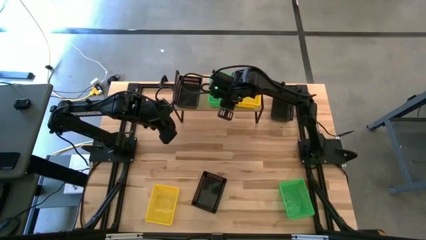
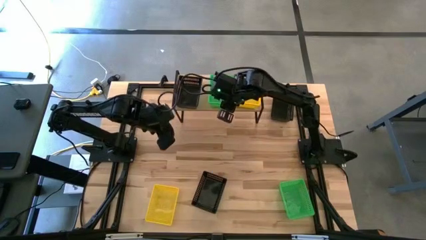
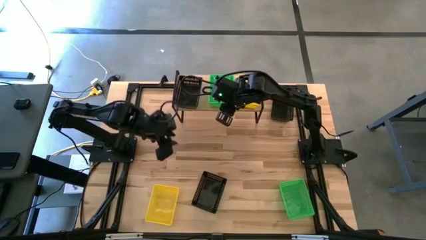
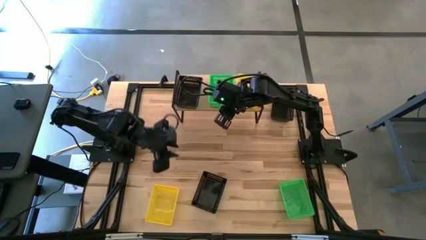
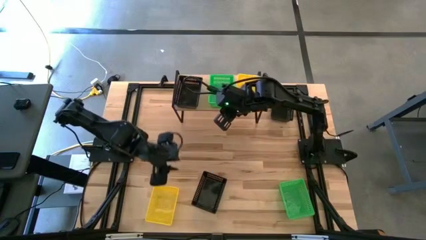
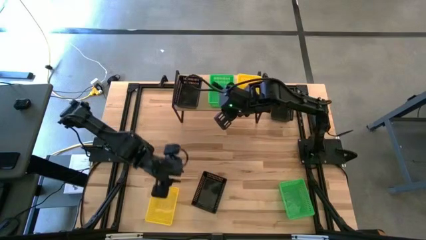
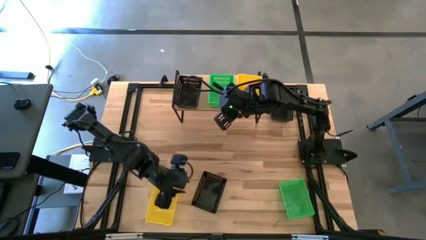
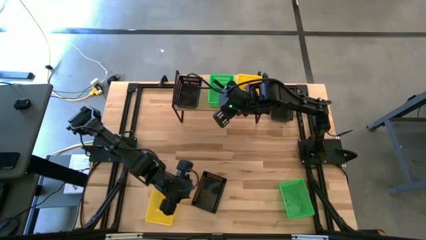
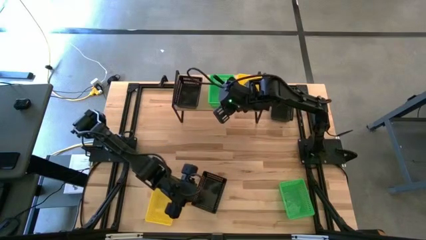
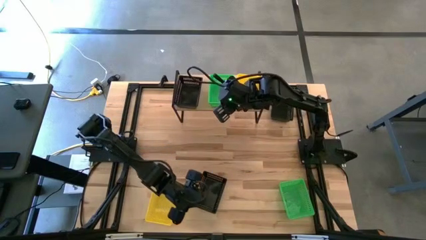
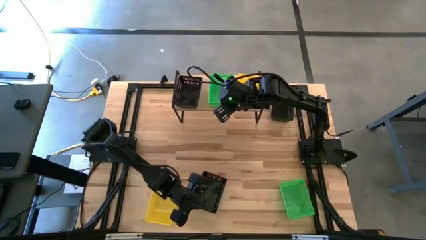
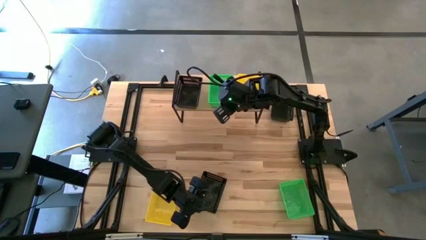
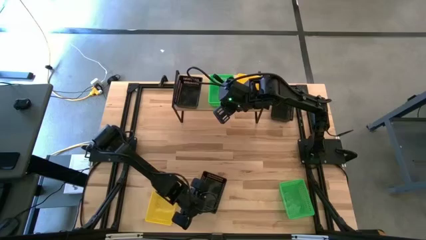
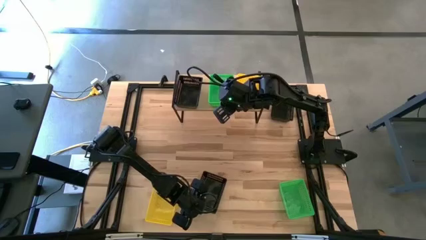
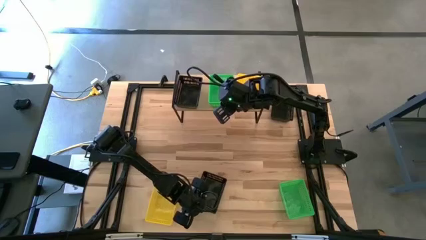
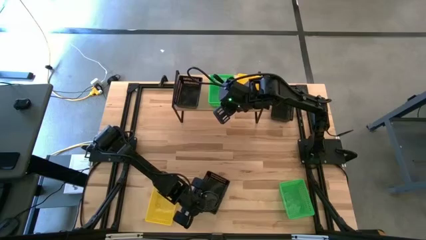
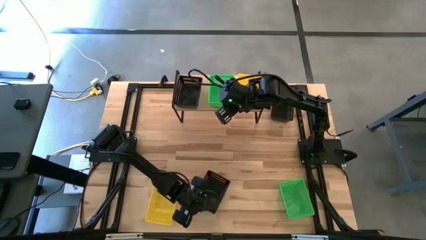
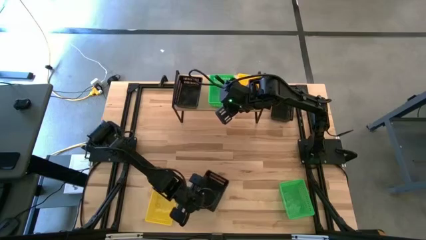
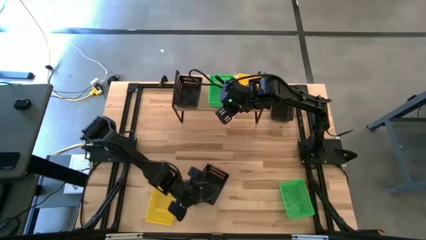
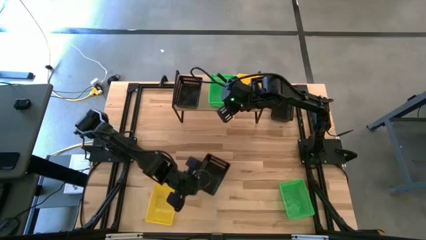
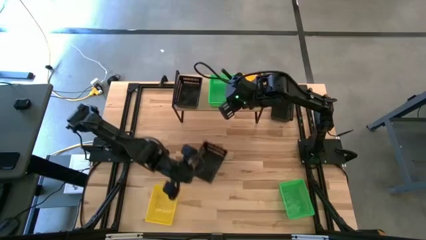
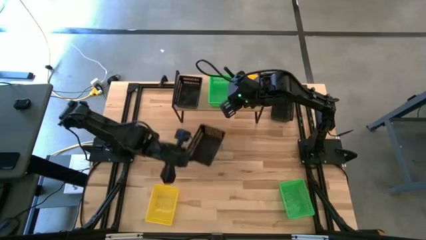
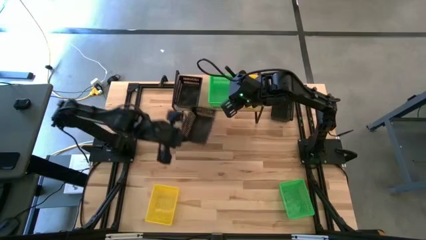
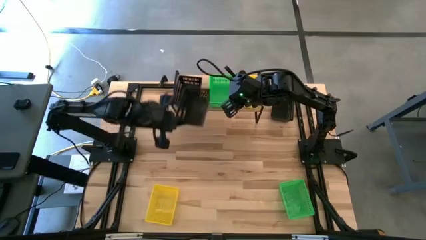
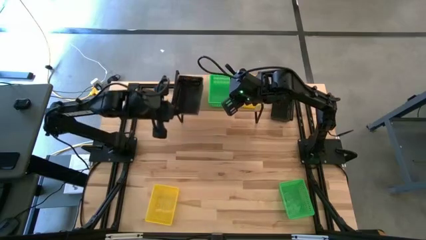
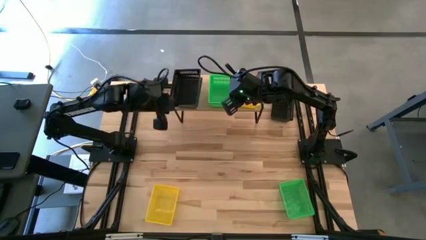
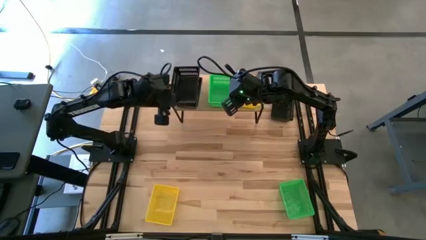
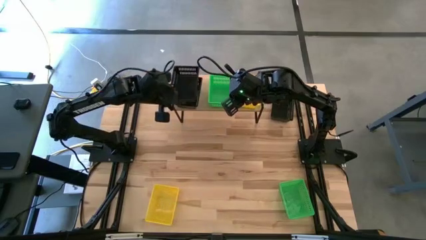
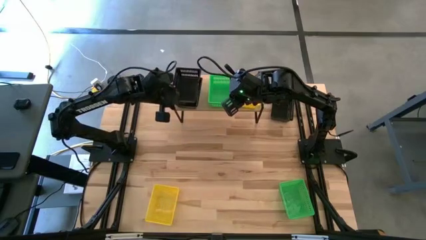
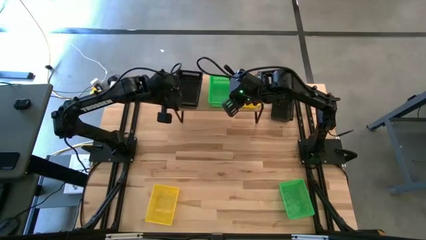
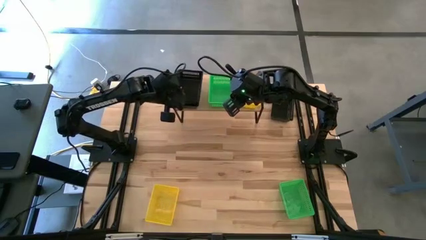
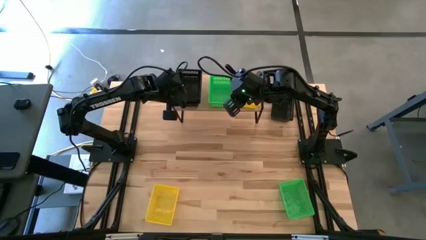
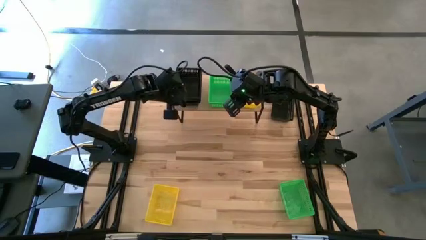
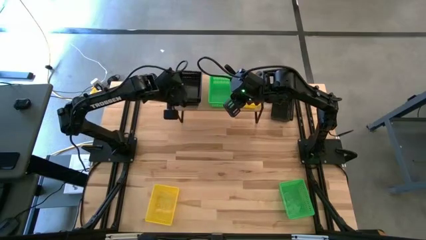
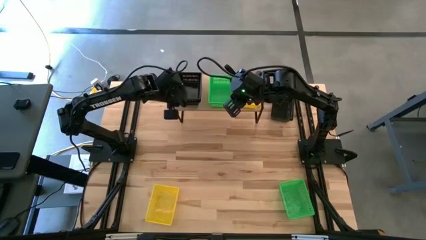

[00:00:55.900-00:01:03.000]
Task: Stack baskets on shelf by color
Stack the bottom black bin on top of the other black bin on the shelf

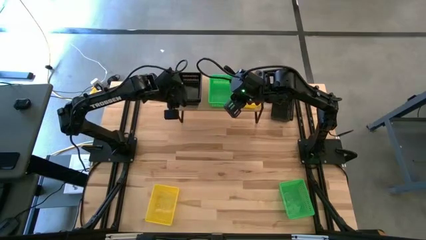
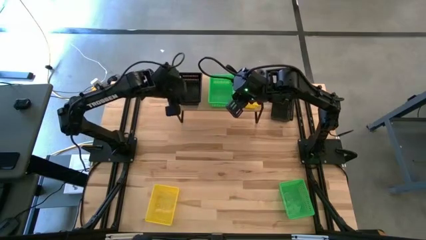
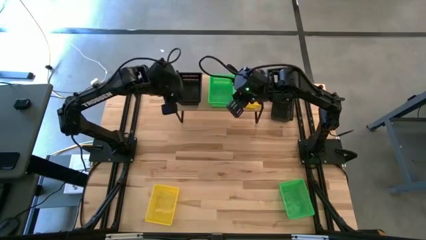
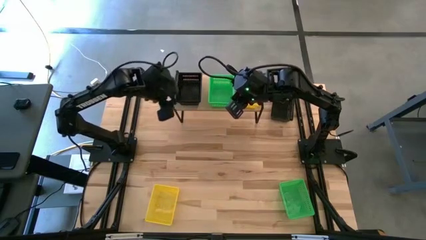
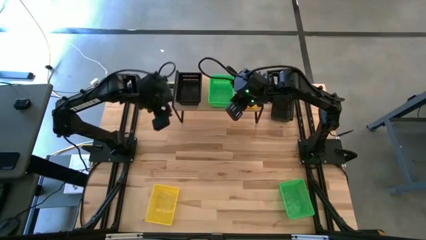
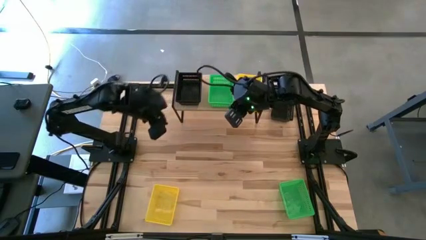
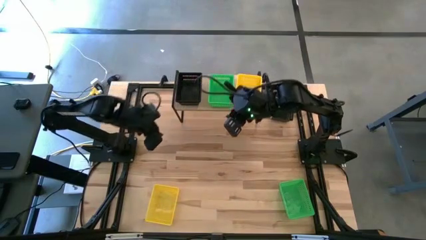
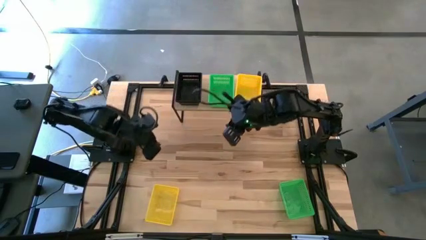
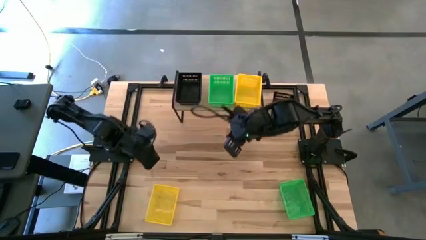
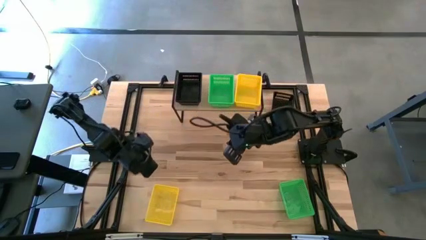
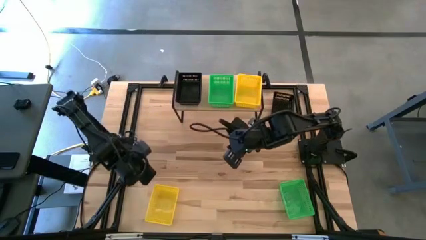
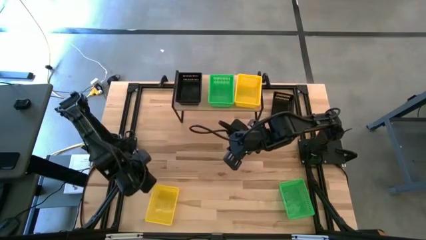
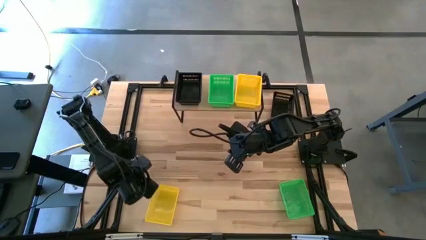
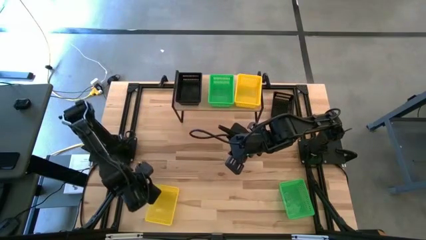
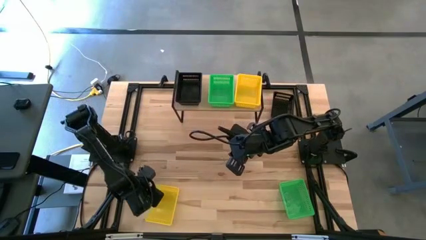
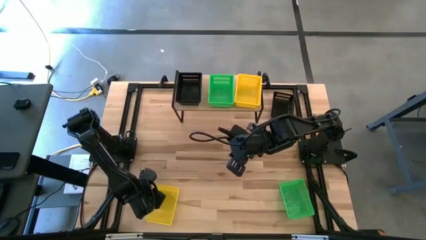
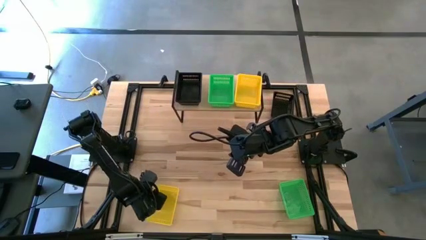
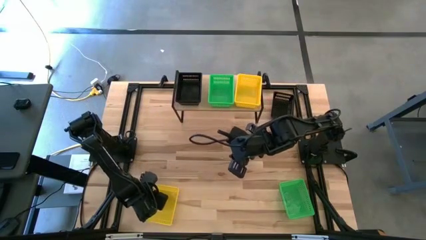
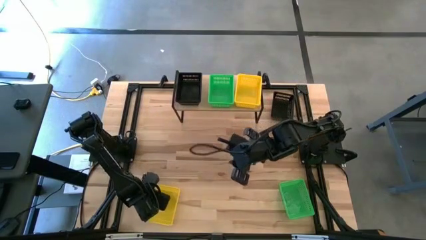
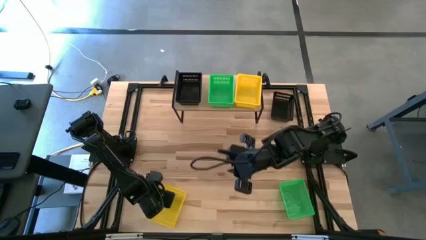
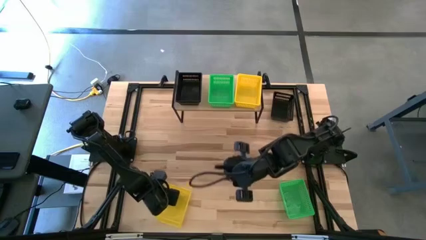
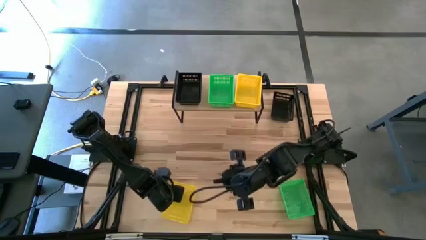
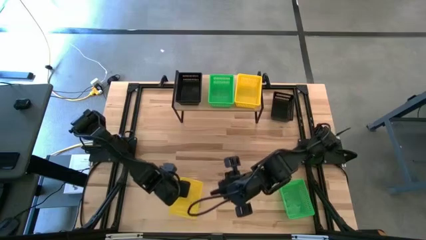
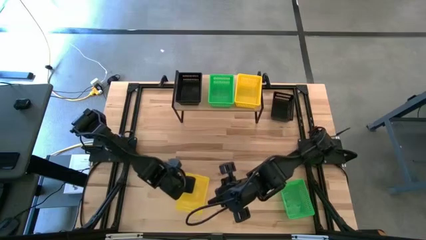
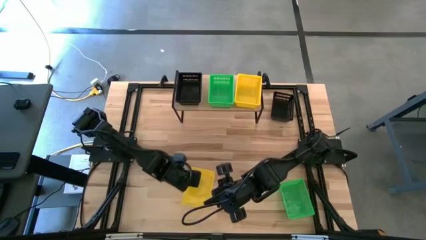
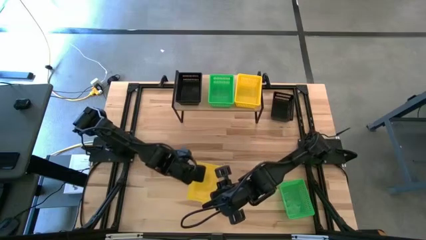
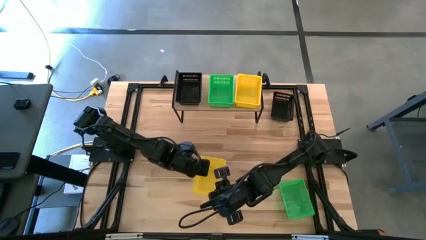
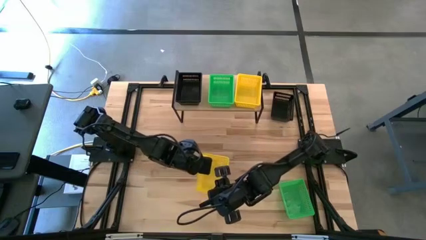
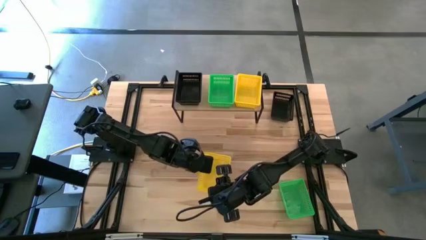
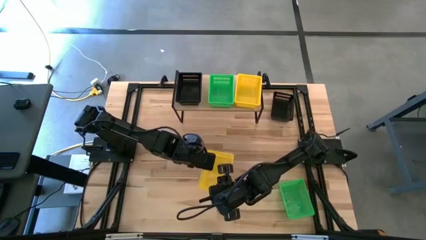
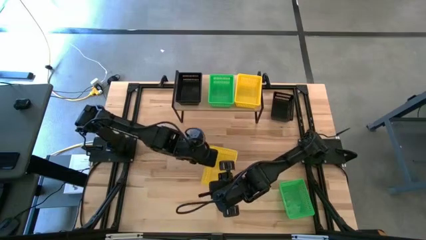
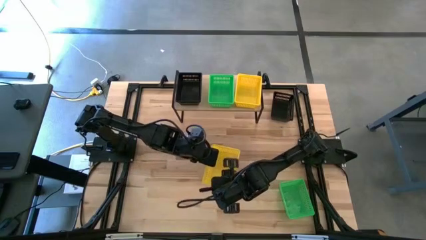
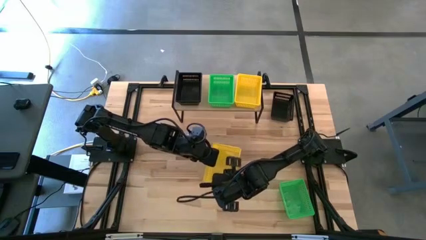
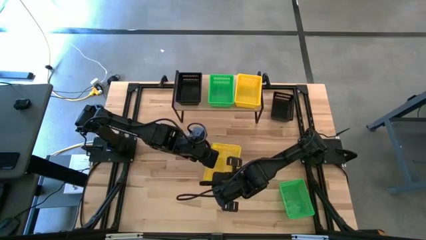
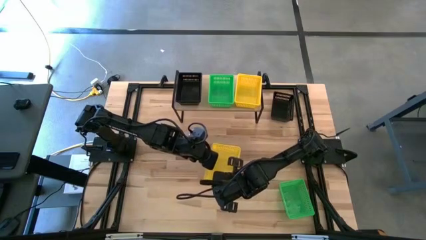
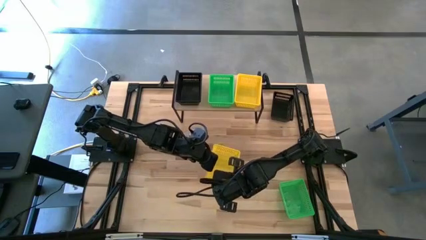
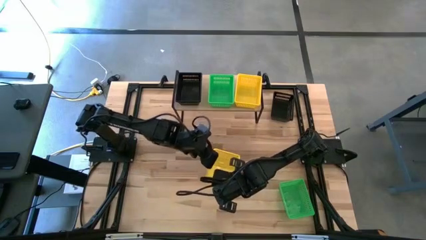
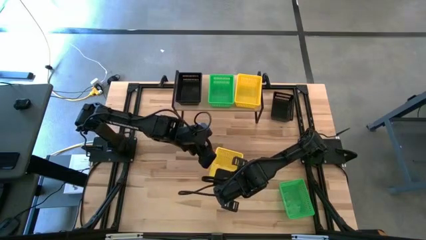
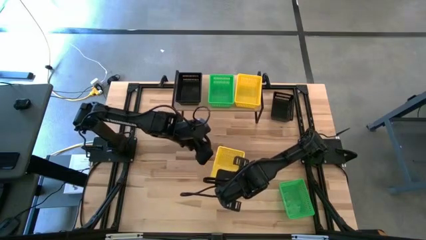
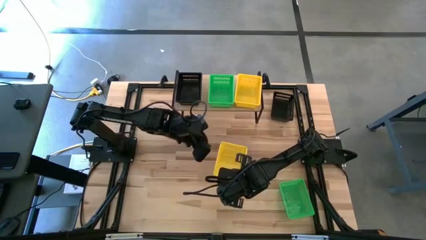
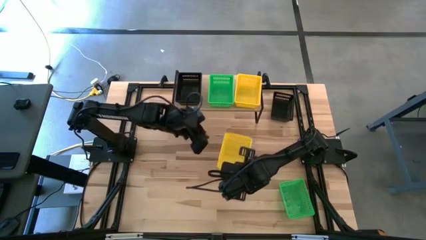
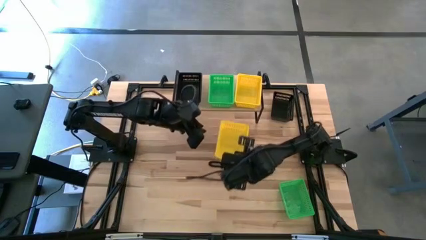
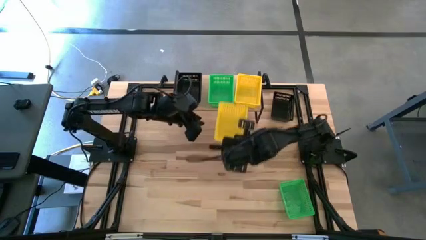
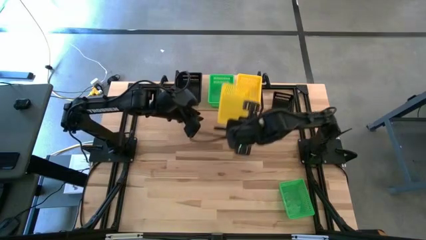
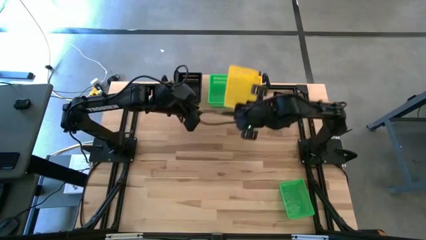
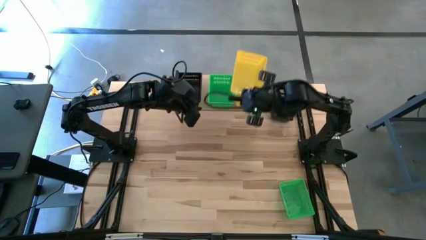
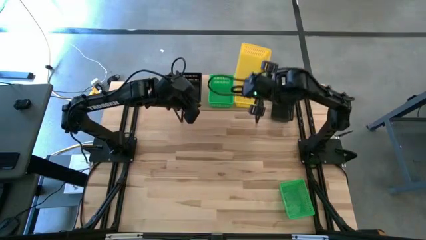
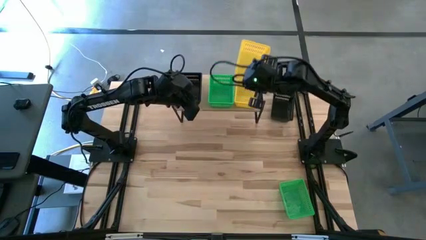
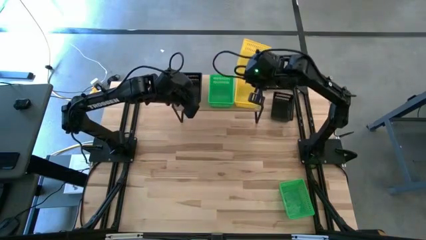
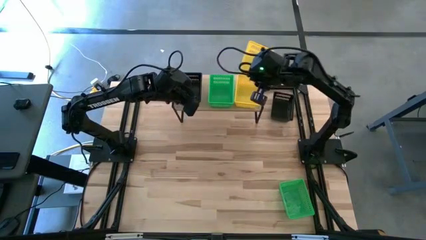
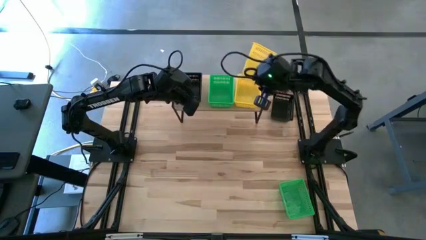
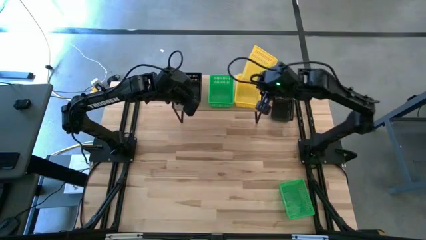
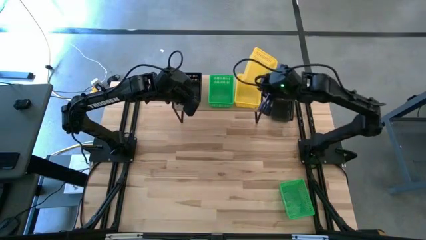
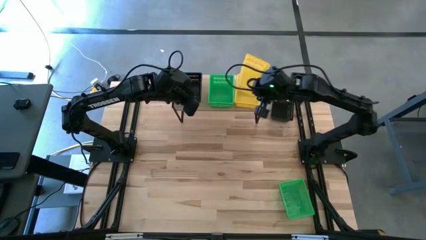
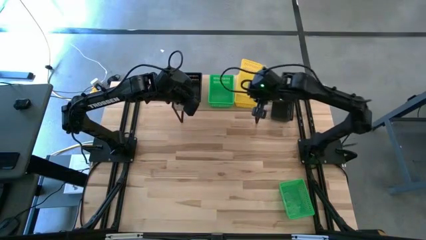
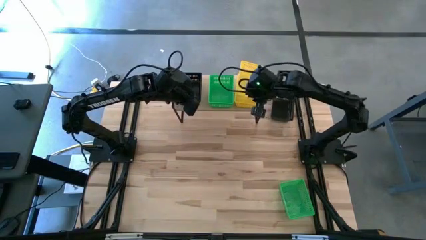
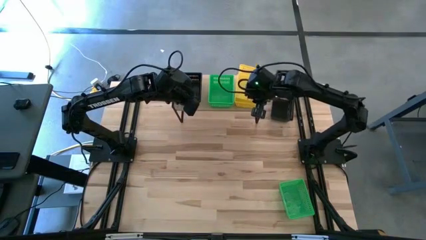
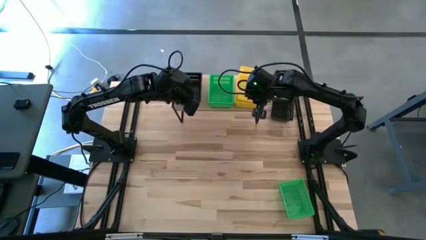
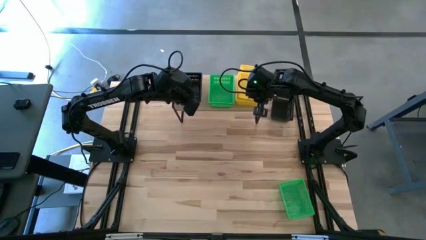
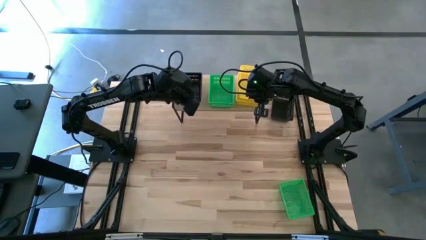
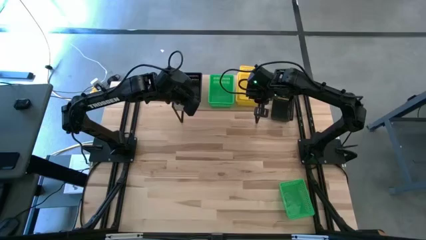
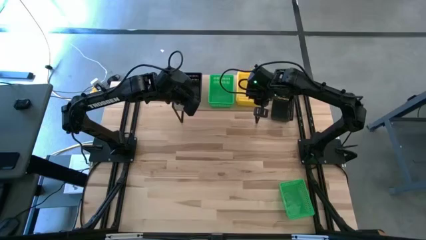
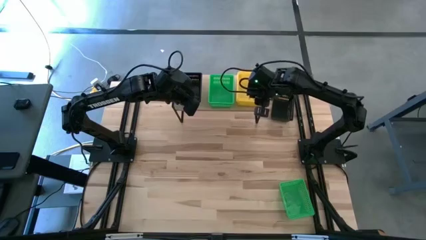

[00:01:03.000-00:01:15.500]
Stack the yellow bin on top of the other yellow bins on the shelf
